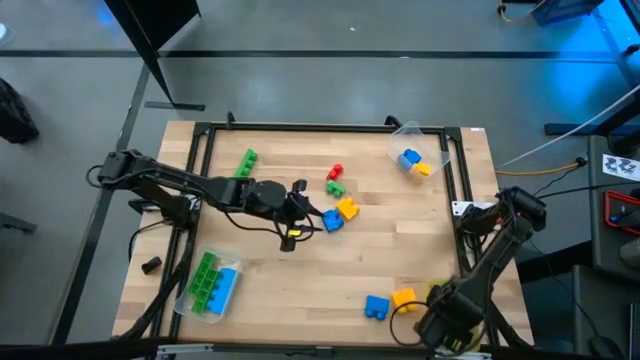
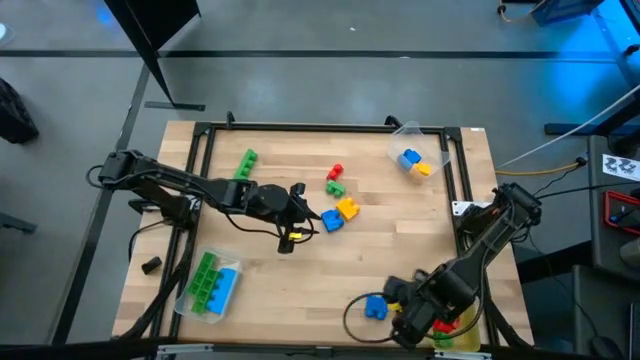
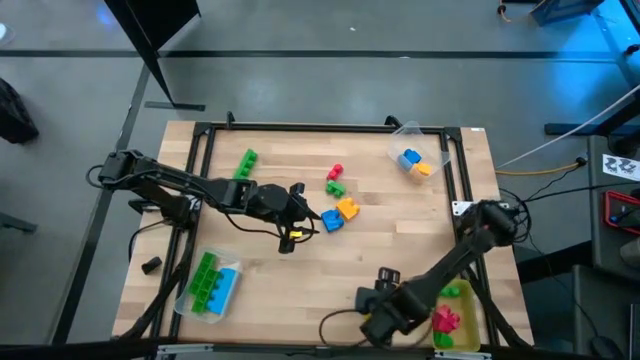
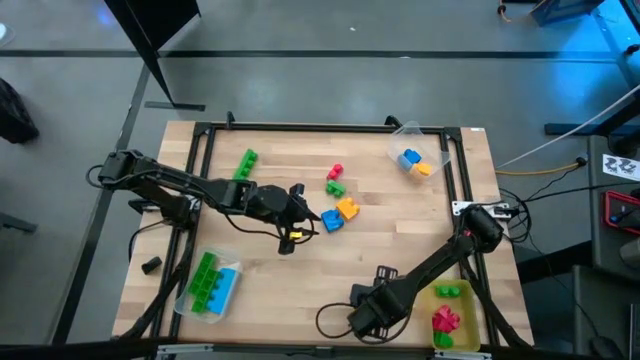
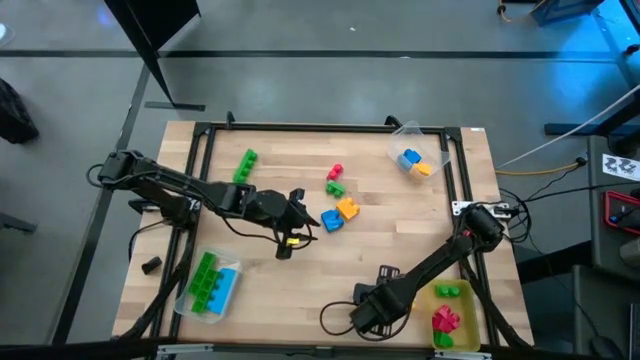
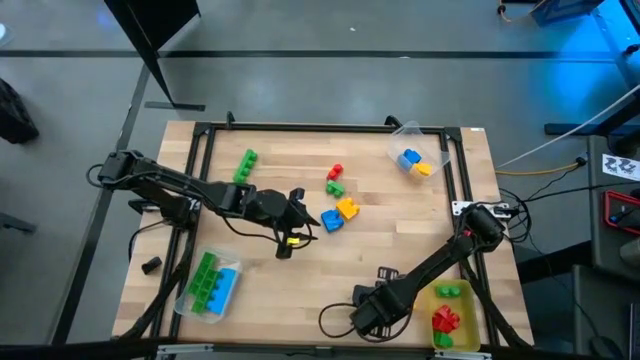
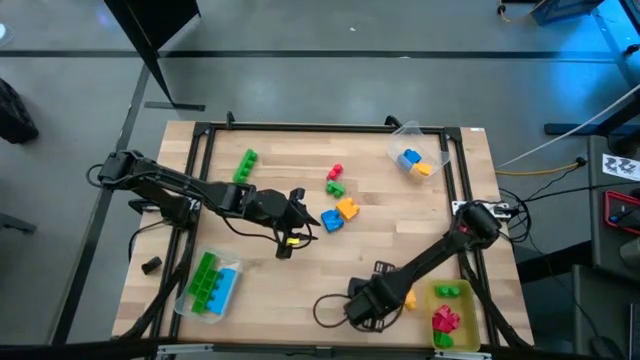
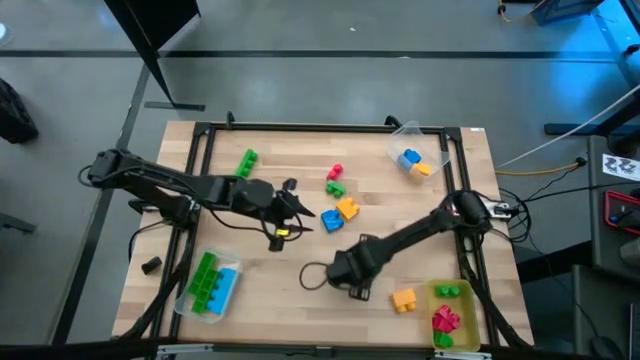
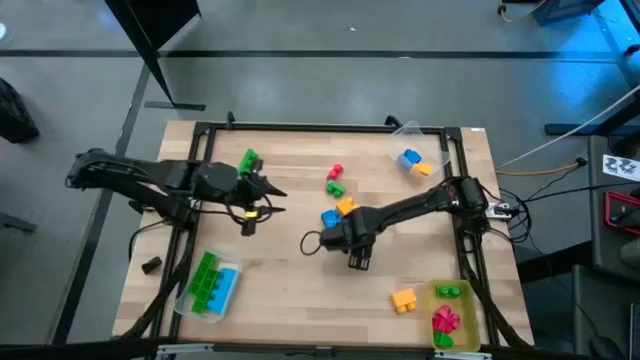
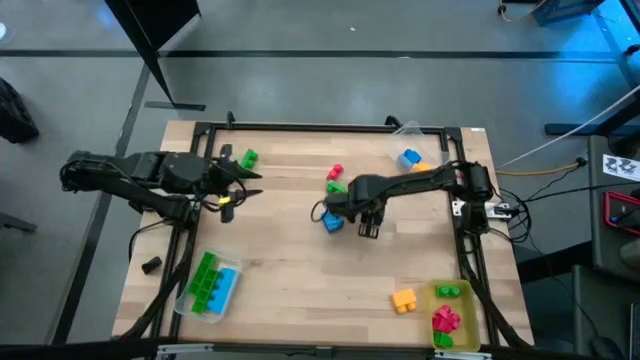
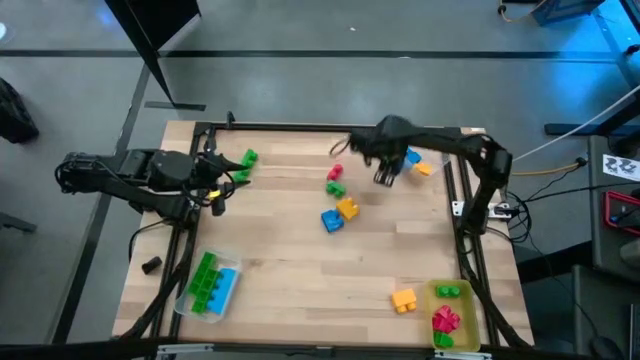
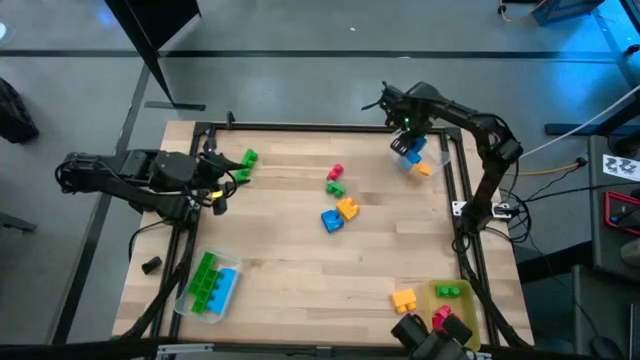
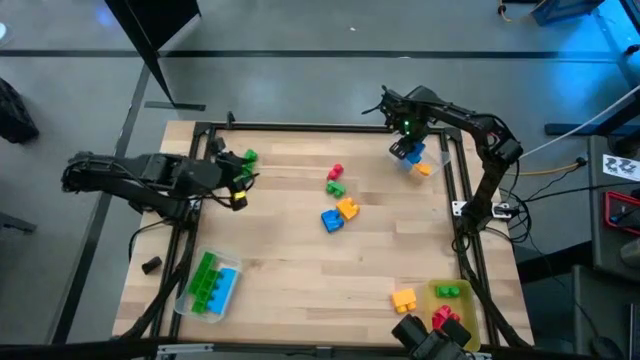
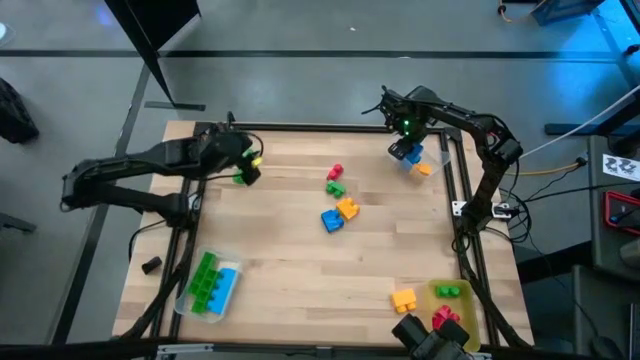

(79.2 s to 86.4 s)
Task: Sort blocks by size
Put the bottom 2 stud blue game piece into the top transparent bin

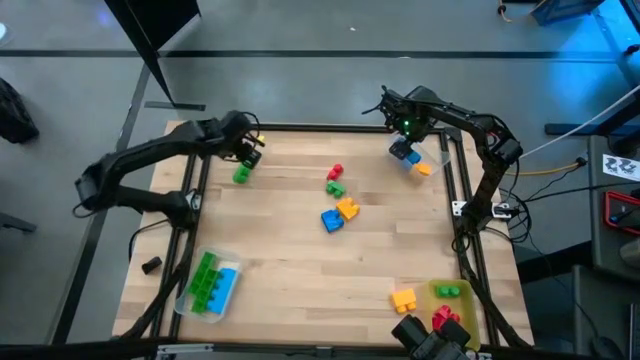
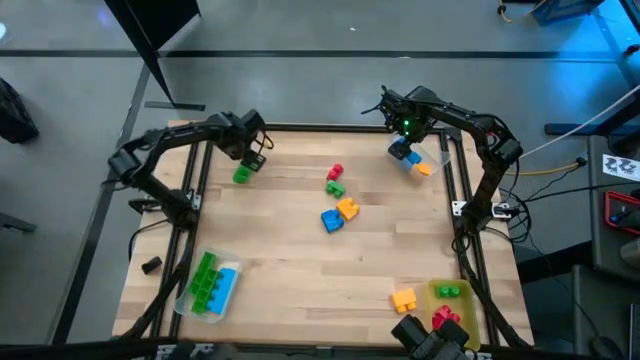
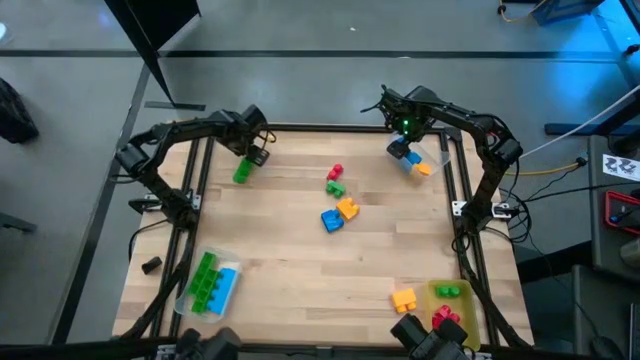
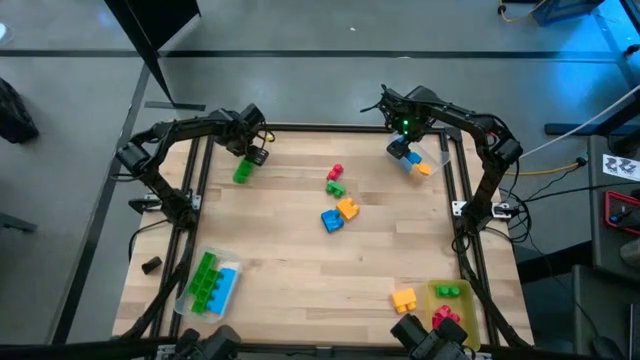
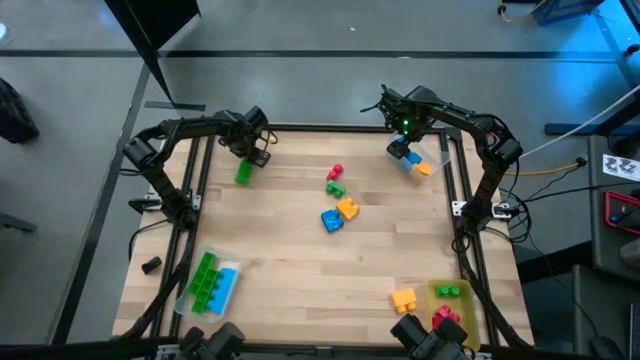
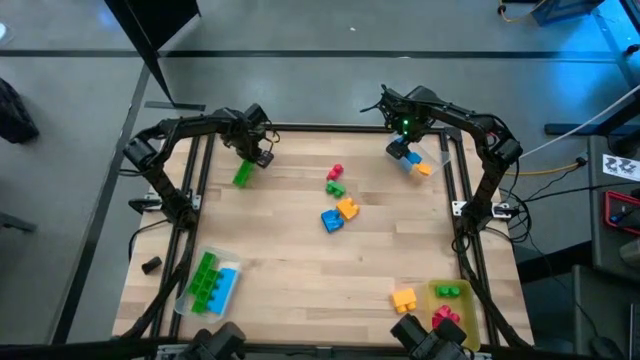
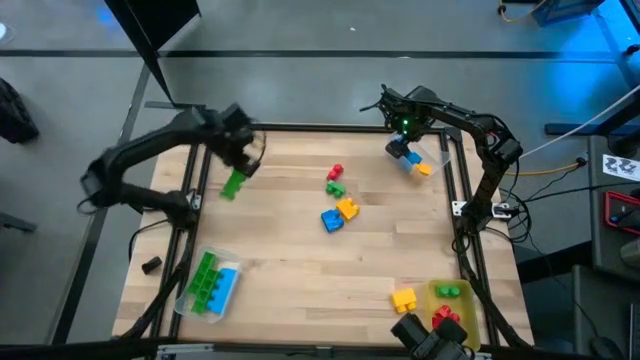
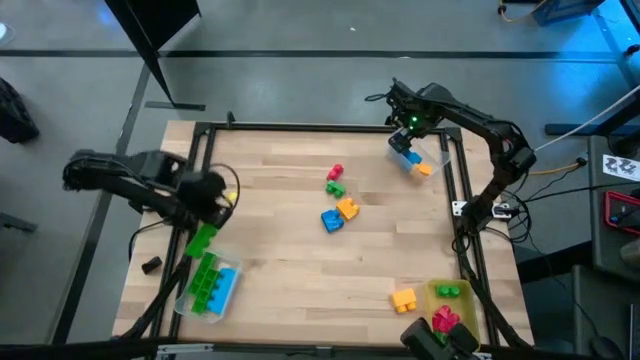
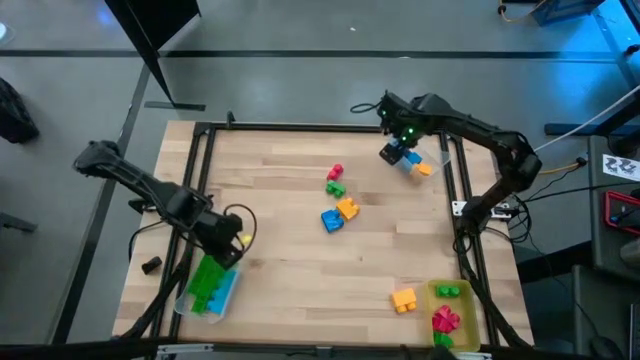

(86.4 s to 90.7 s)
Put the 4 stud green game piece into the bottom transparent bin

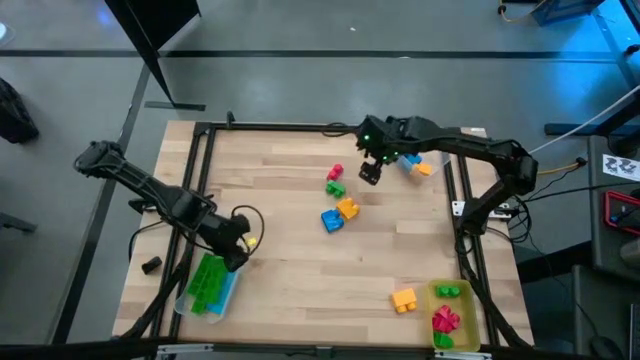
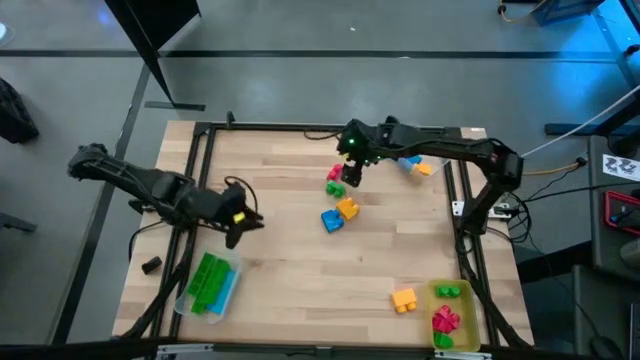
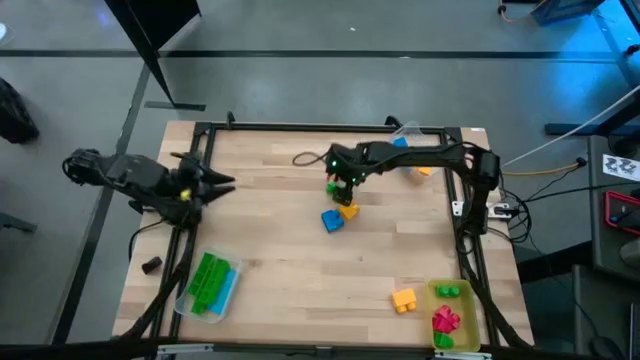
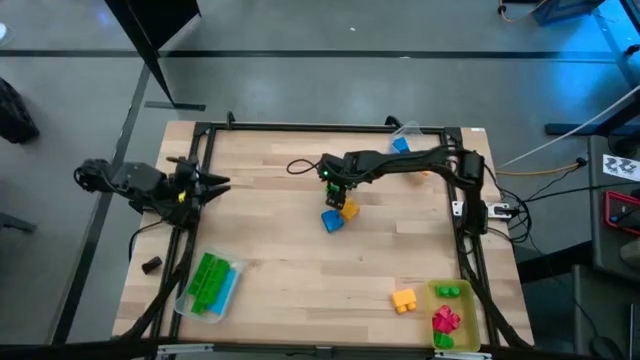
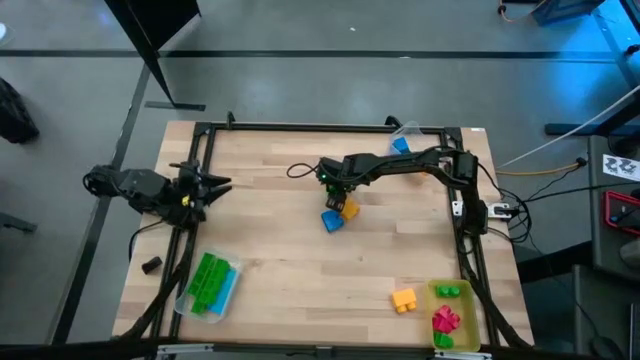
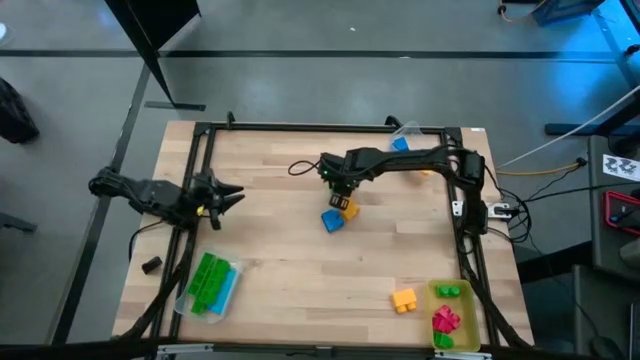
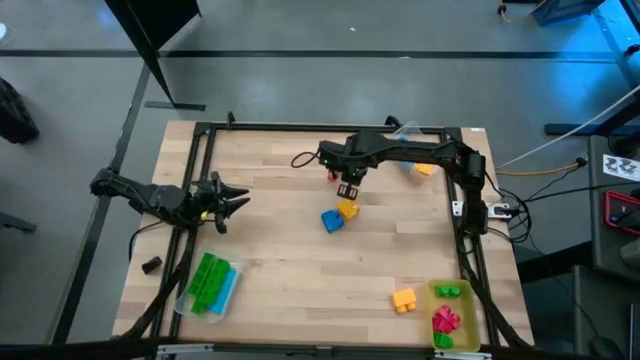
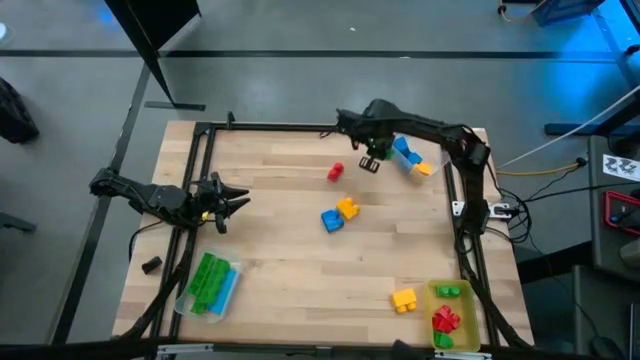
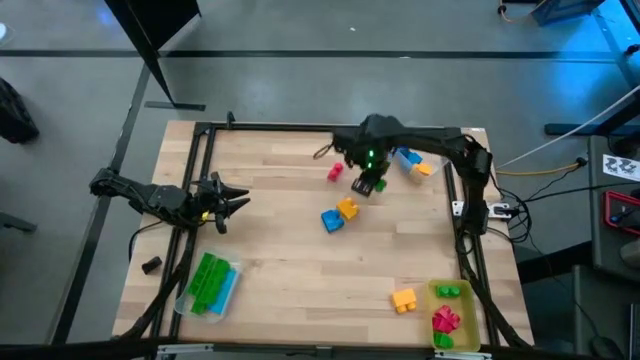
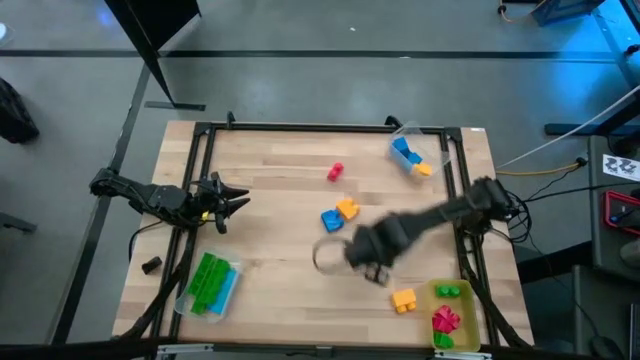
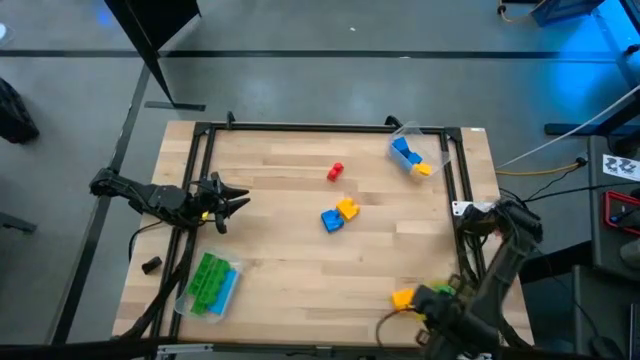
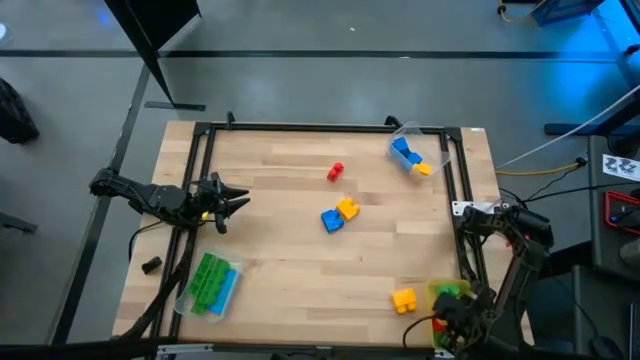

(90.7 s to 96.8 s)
Put the 2 stud green game piece into the yellow transparent bin

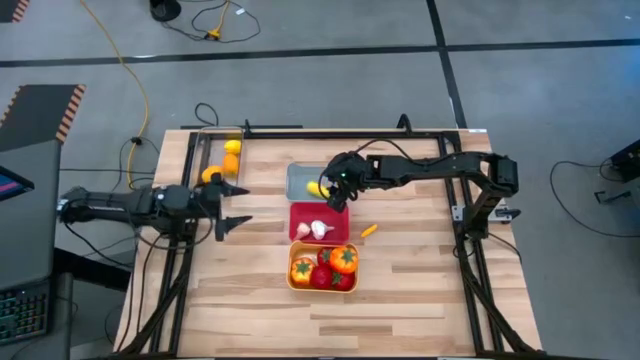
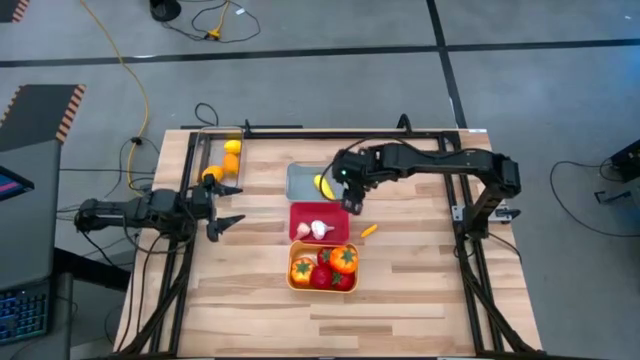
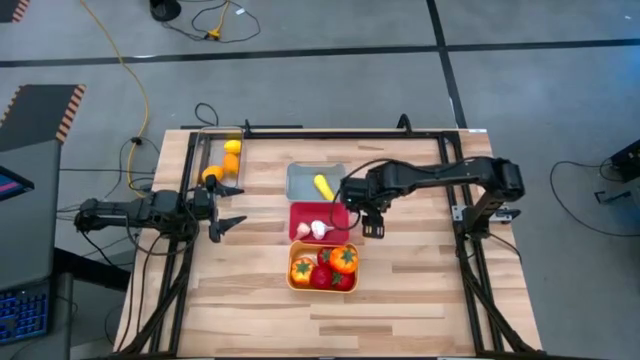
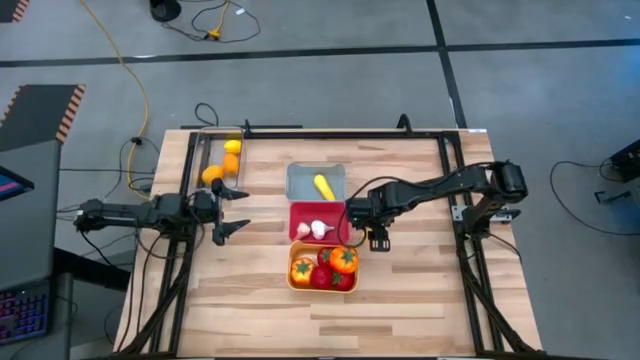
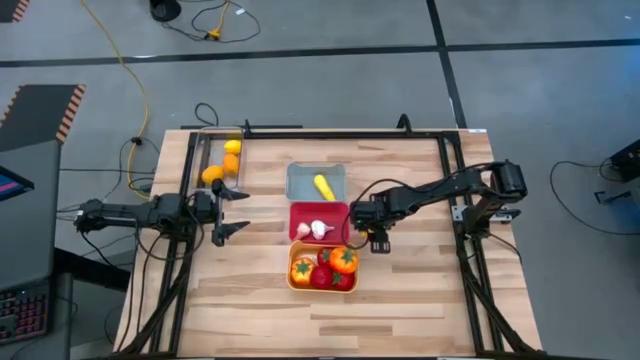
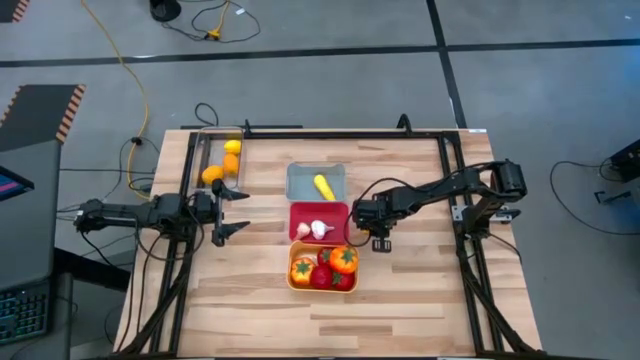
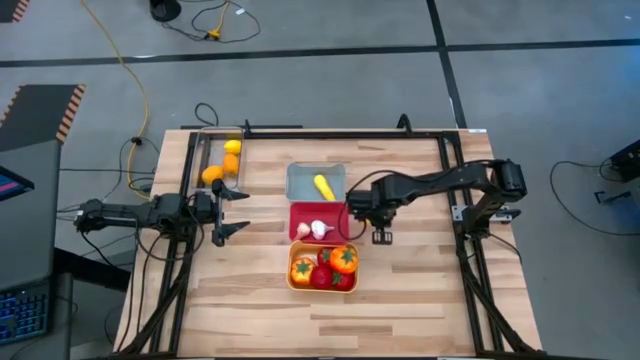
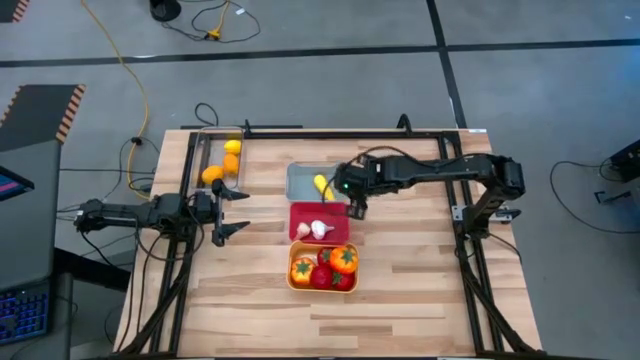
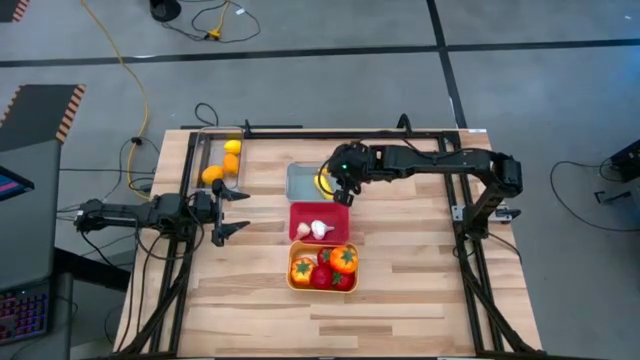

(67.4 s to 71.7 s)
Task: Sort produce into baskets
Put the yellow corn into the gray bin
